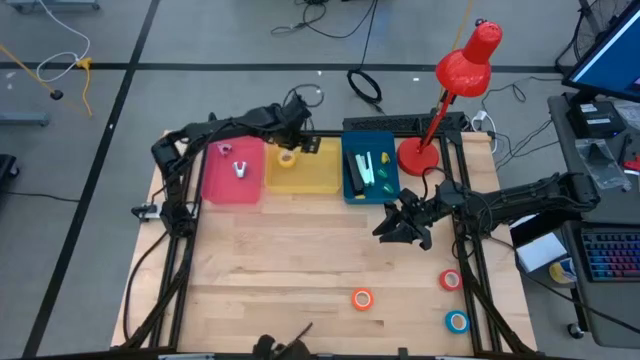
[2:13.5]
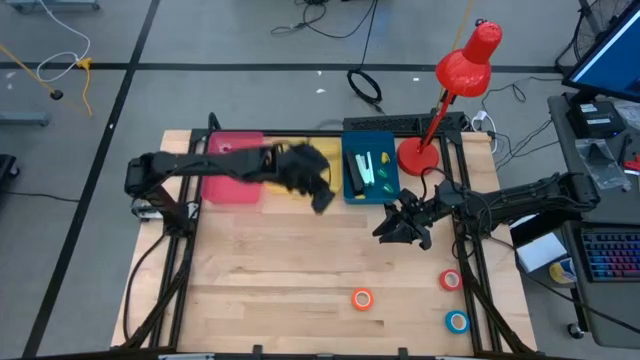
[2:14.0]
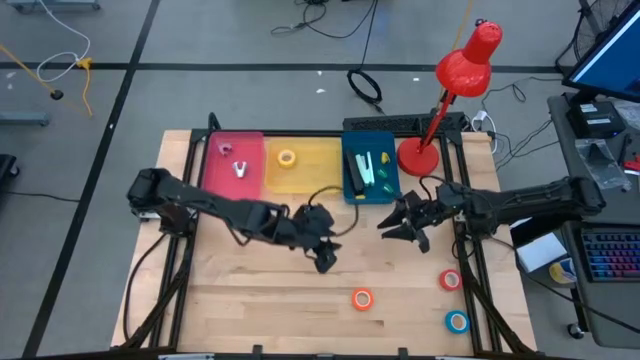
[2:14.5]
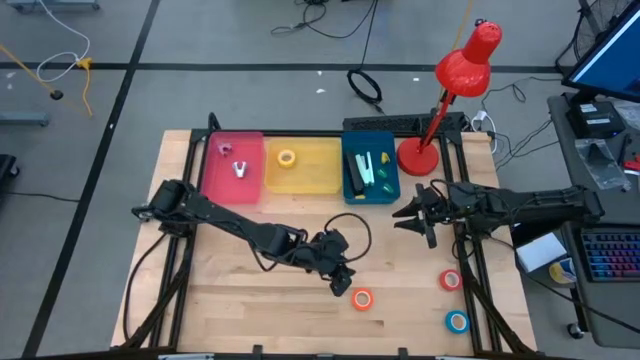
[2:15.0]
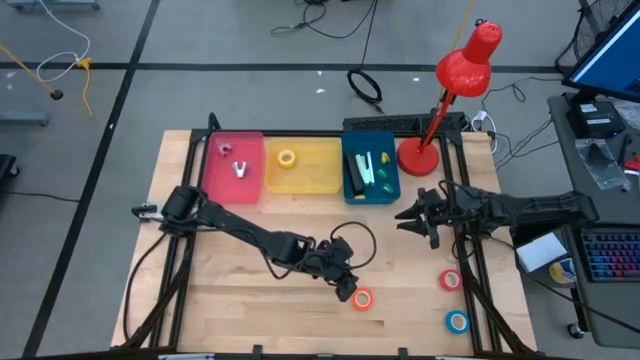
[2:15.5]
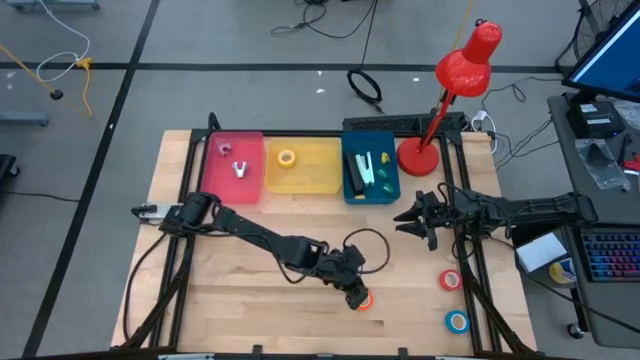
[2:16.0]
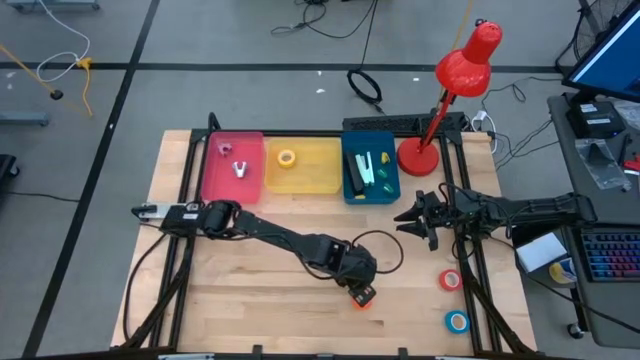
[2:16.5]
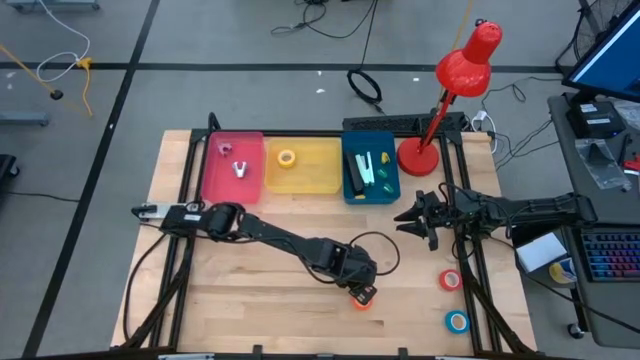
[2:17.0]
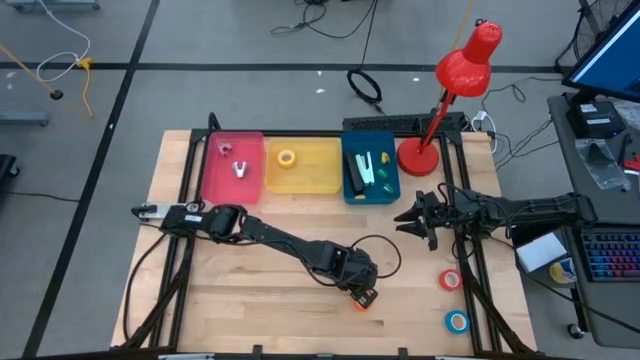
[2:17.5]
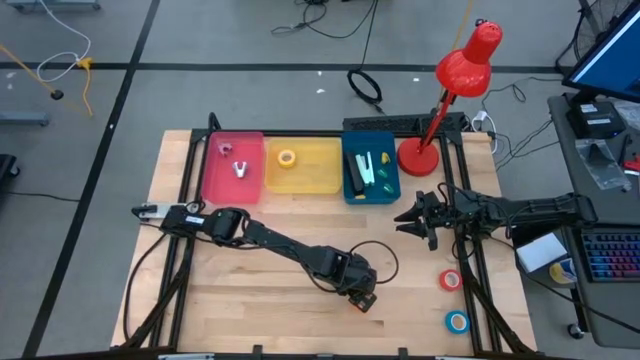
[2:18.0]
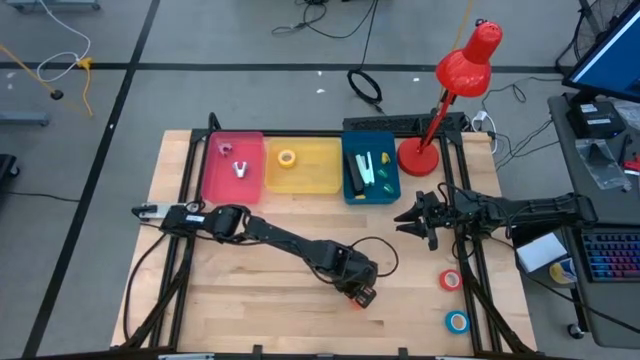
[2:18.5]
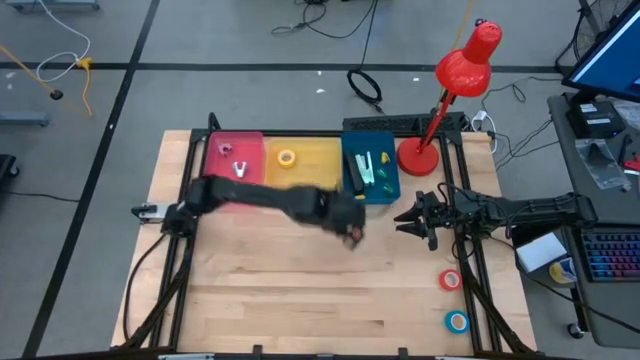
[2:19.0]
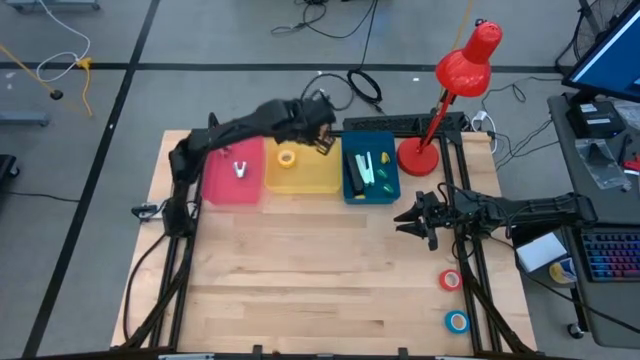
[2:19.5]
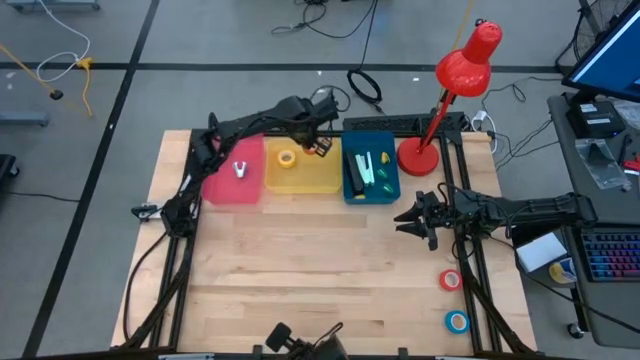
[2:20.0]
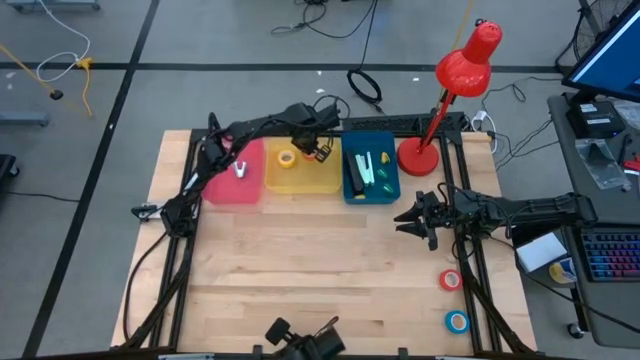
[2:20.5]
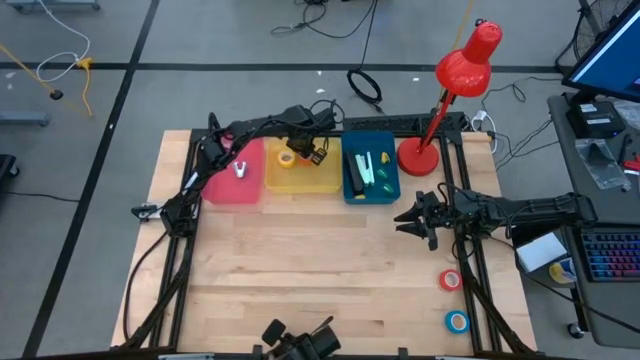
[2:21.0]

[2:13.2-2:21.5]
Task: Pick and place Stapler, Stapler remover, tape
Put the left orange tape into the yellow bin

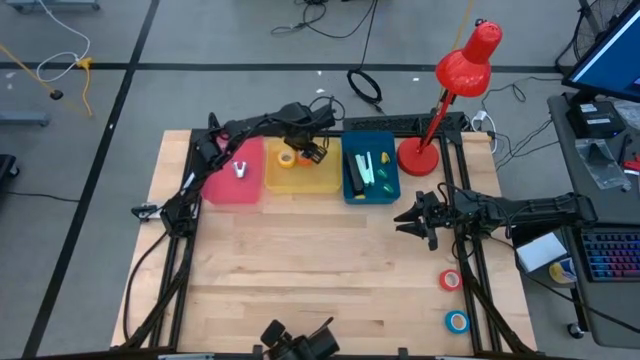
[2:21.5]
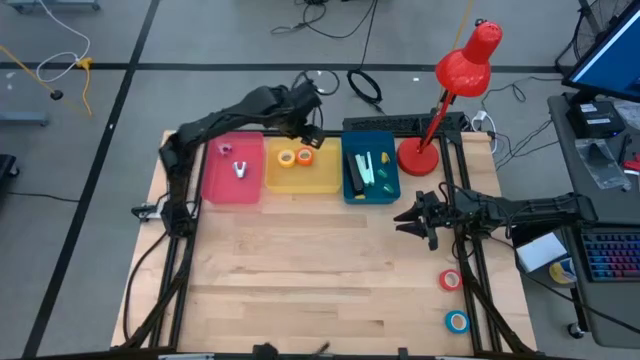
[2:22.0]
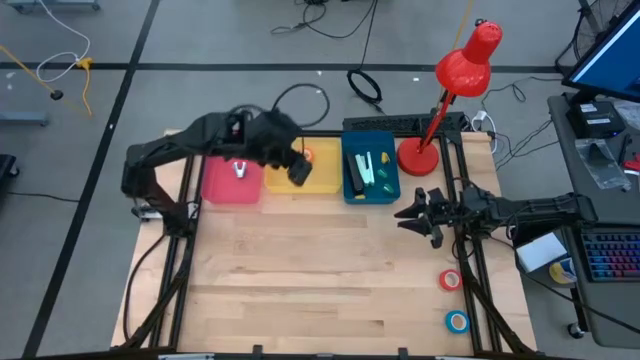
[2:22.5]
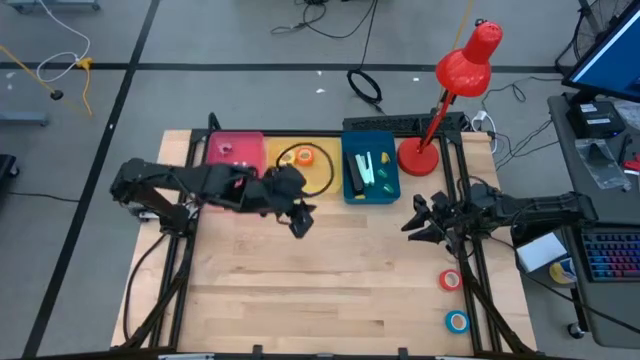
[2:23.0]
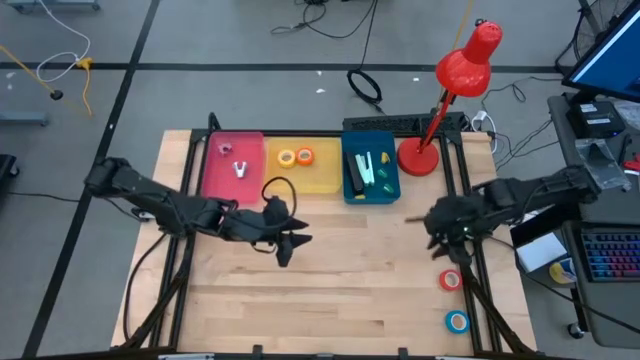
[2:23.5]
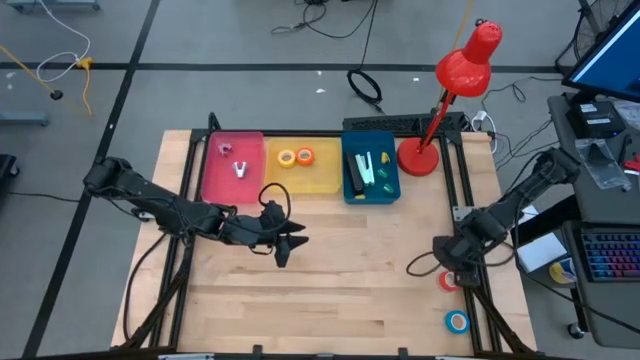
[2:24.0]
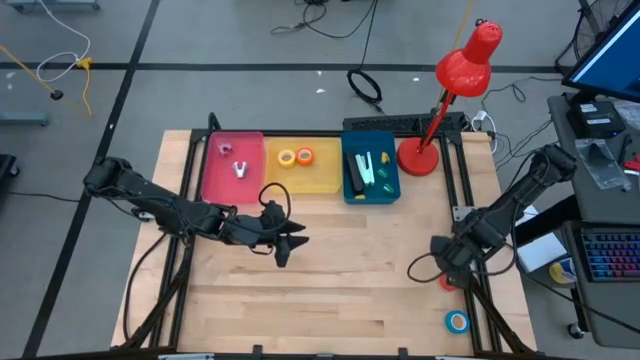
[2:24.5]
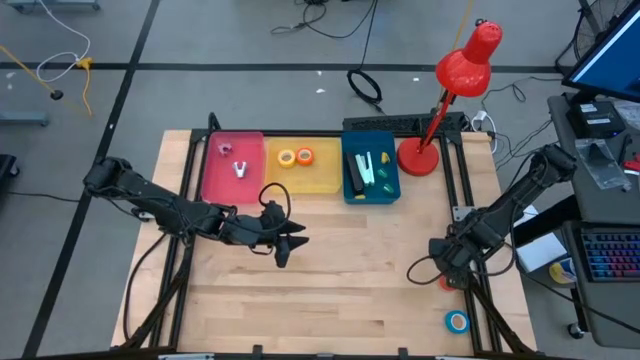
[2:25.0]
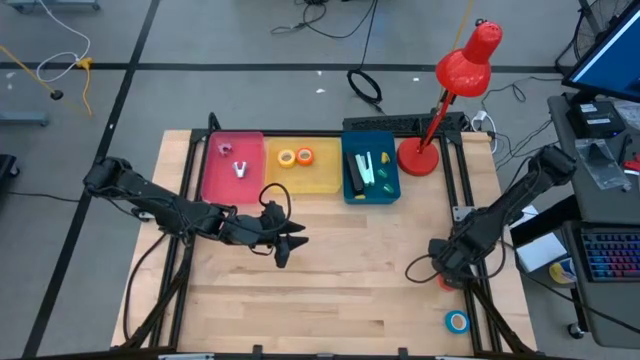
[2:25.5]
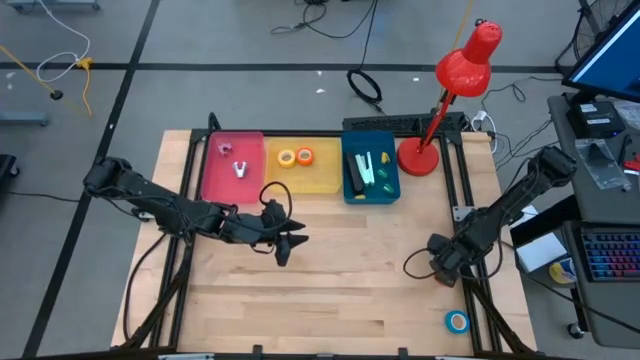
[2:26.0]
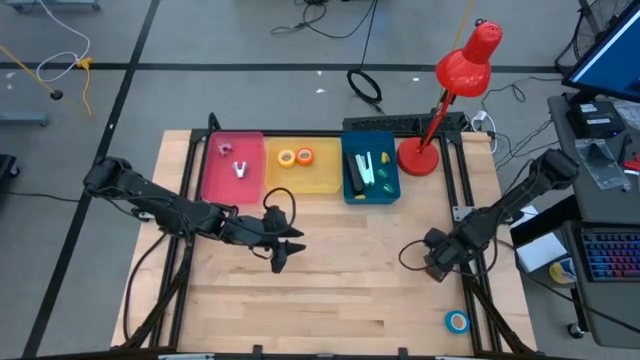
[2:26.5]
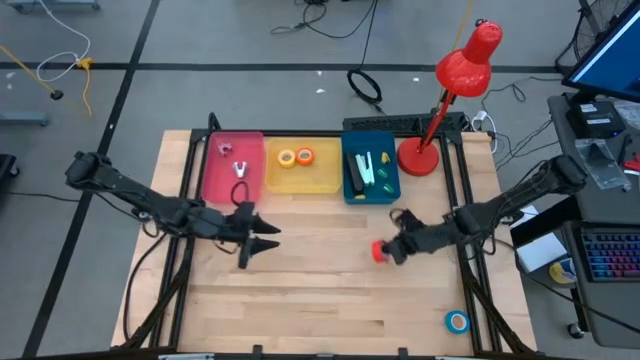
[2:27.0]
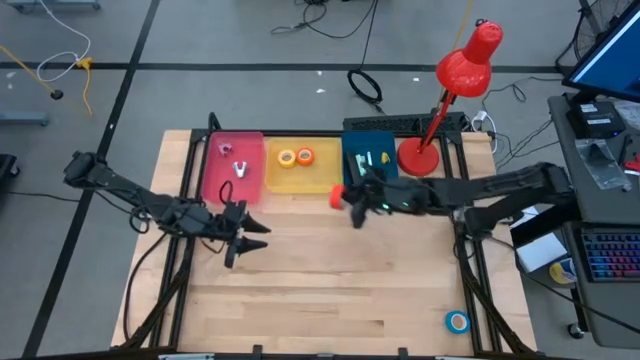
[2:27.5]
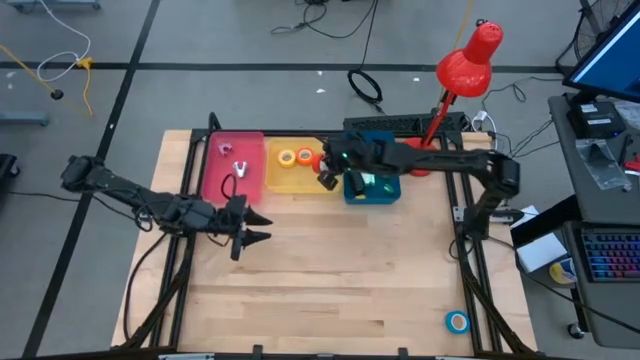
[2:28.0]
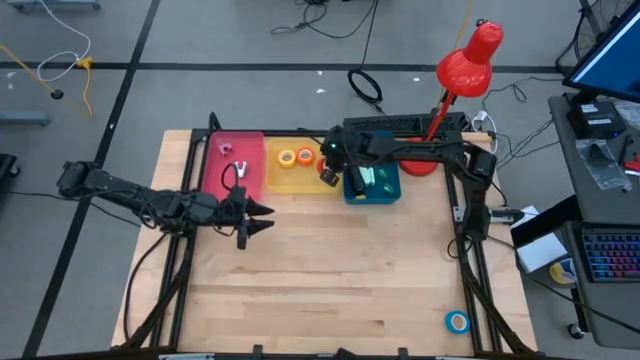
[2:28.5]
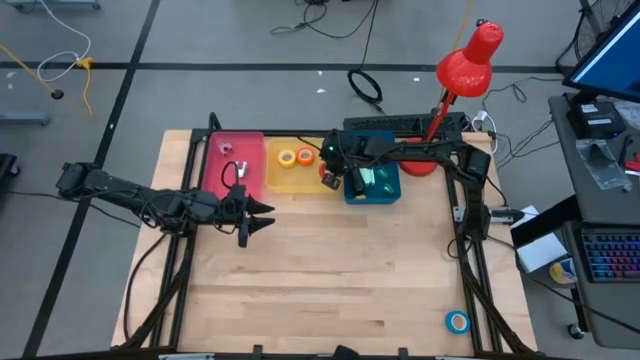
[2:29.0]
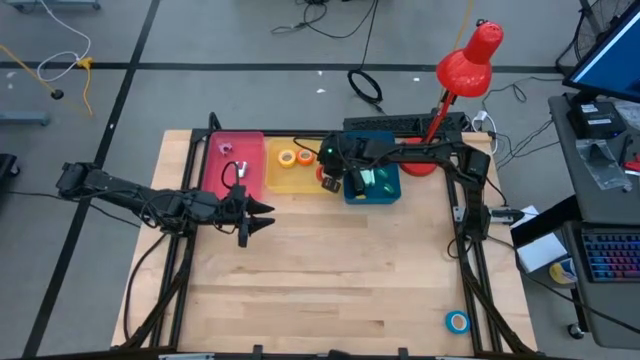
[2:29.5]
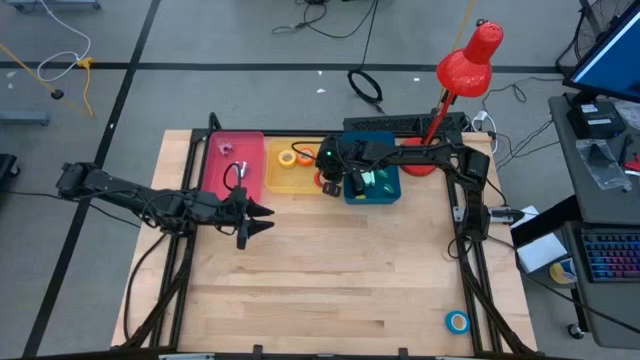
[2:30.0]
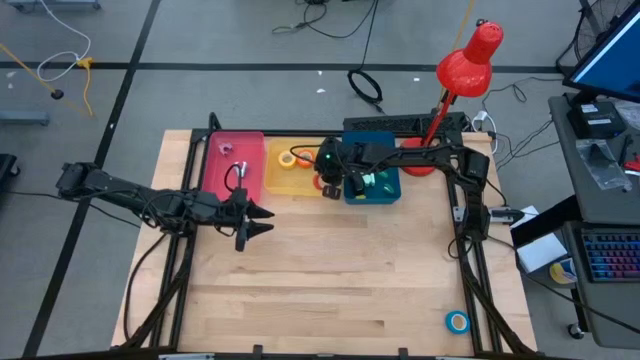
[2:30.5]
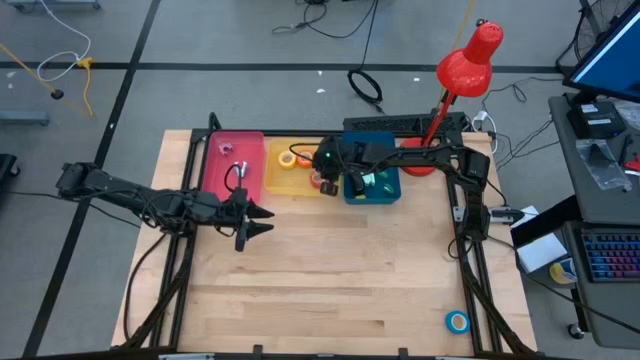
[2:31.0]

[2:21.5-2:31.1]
Put the red tape into the yellow bin

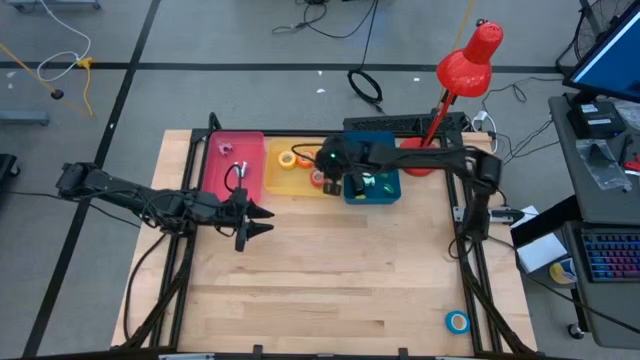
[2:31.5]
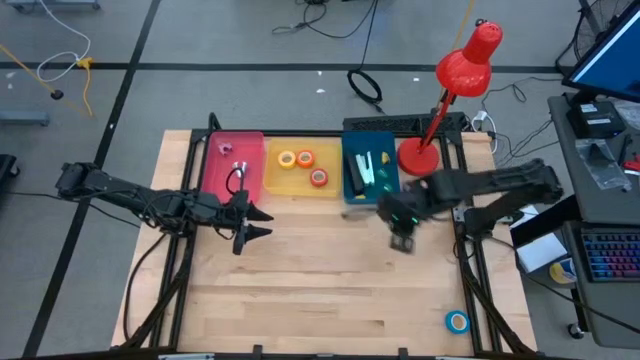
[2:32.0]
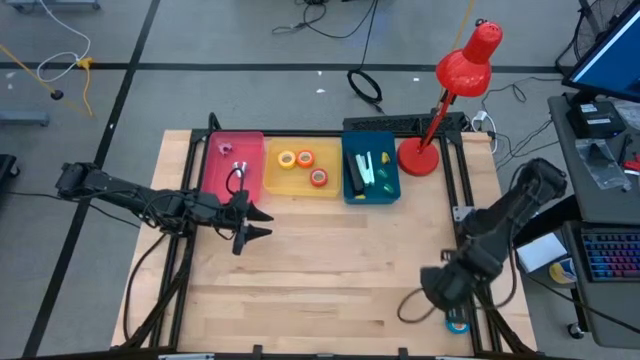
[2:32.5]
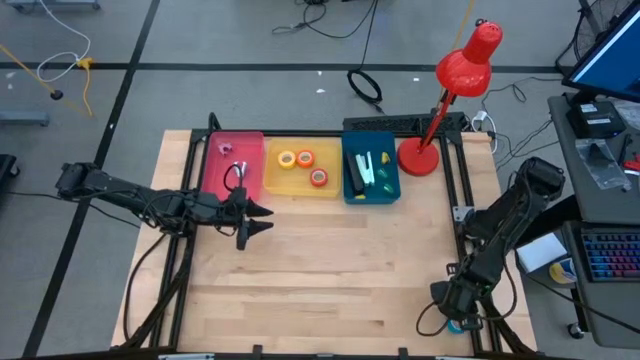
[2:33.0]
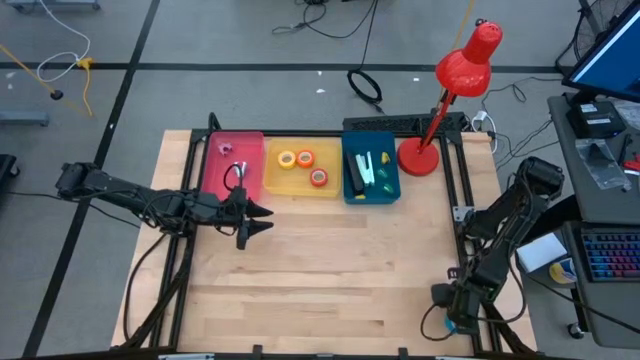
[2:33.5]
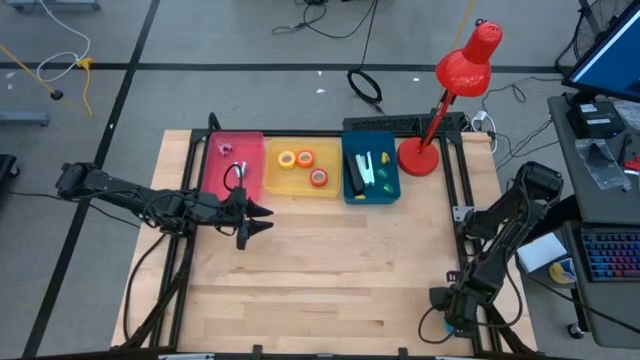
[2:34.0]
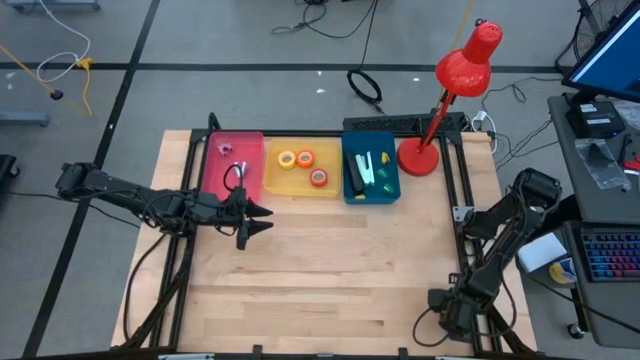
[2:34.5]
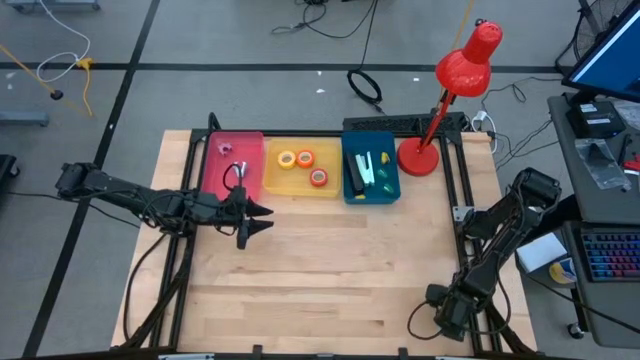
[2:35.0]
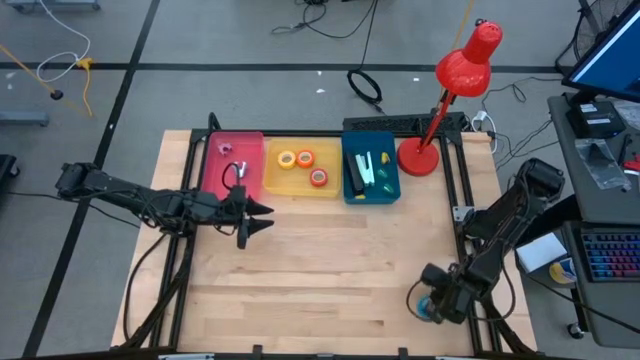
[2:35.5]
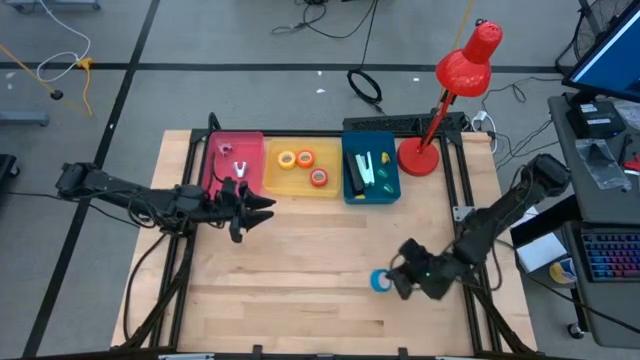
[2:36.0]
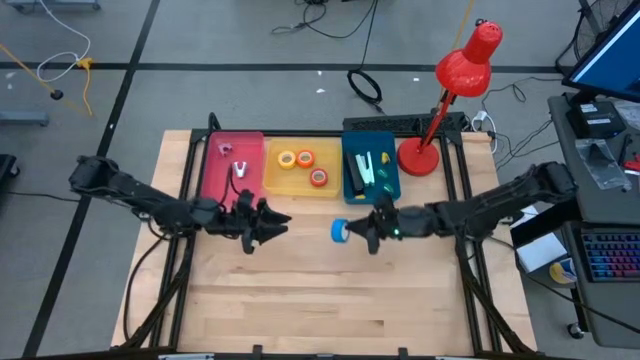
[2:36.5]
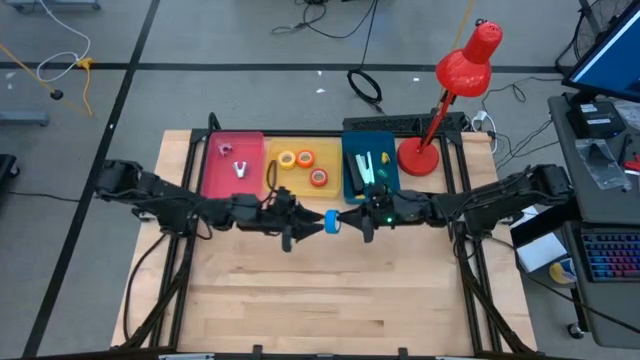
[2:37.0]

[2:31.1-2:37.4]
Put the blue tape into the yellow bin
